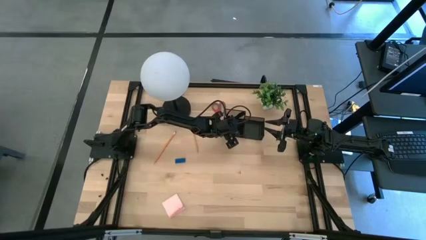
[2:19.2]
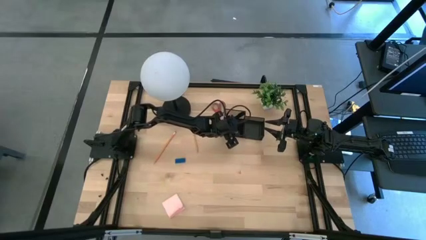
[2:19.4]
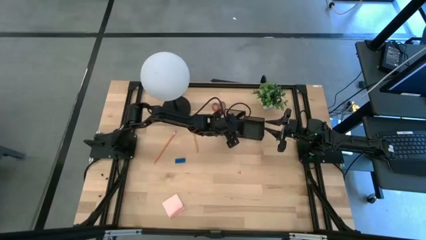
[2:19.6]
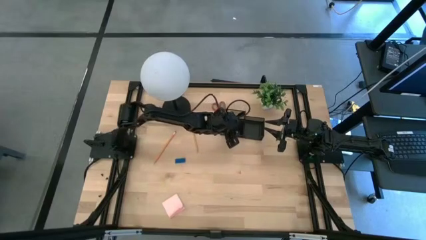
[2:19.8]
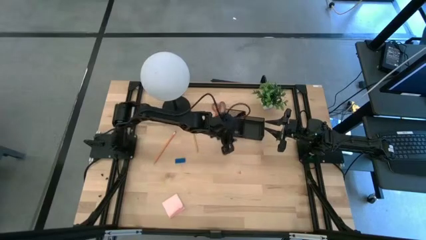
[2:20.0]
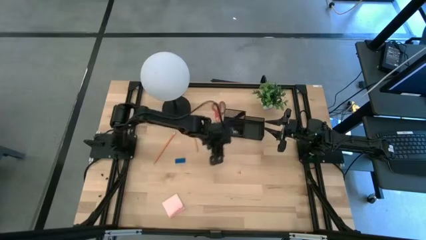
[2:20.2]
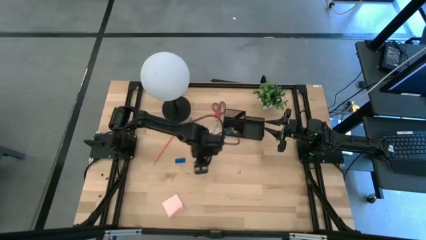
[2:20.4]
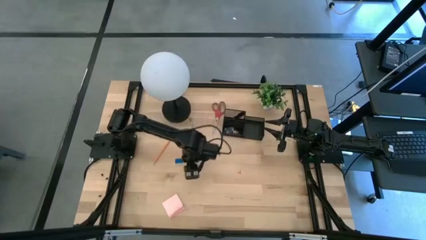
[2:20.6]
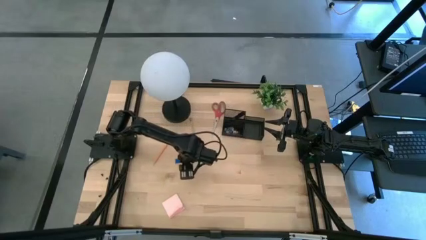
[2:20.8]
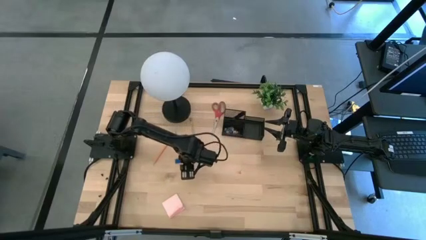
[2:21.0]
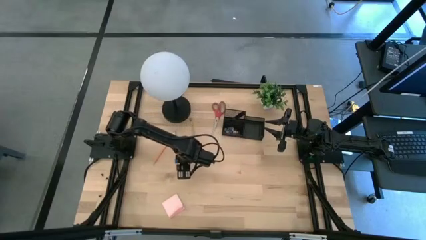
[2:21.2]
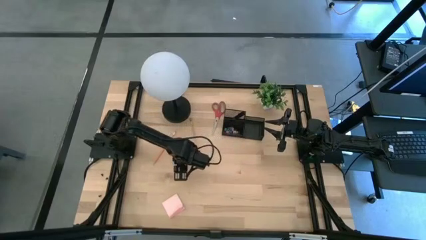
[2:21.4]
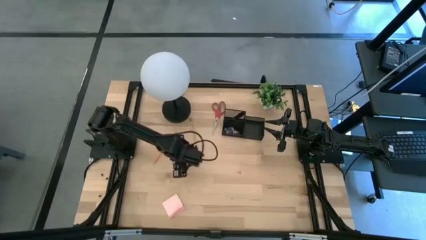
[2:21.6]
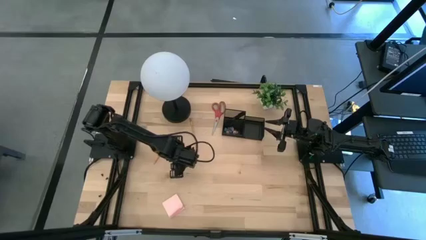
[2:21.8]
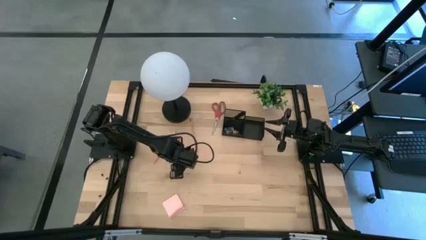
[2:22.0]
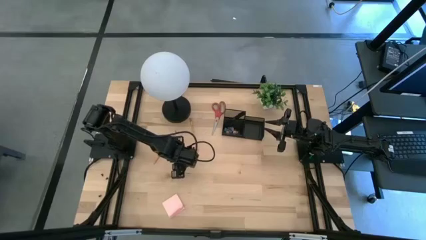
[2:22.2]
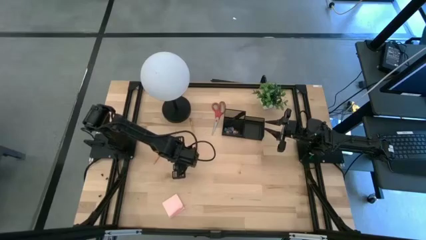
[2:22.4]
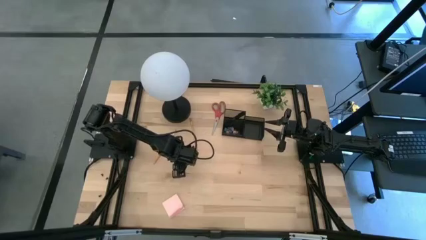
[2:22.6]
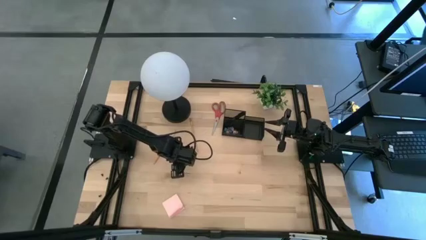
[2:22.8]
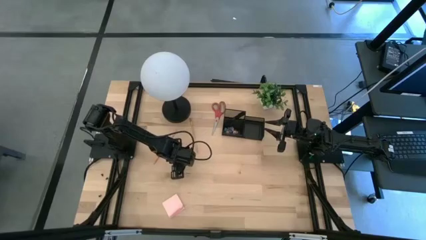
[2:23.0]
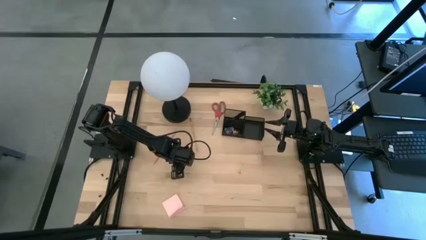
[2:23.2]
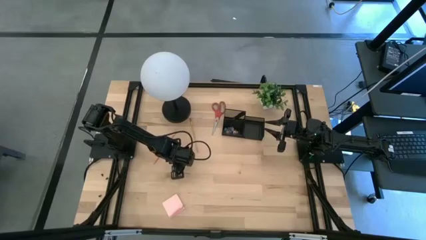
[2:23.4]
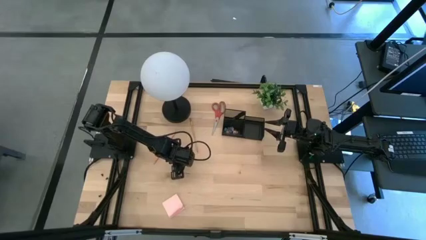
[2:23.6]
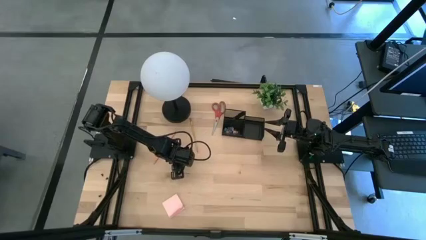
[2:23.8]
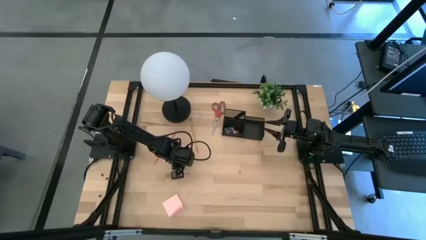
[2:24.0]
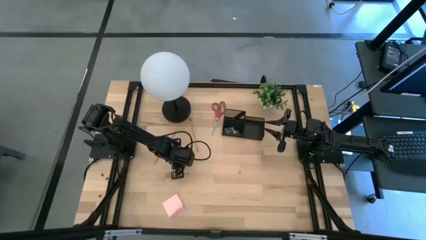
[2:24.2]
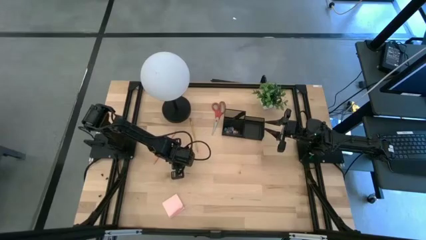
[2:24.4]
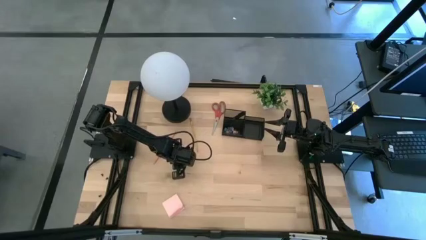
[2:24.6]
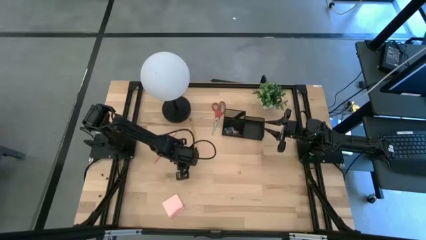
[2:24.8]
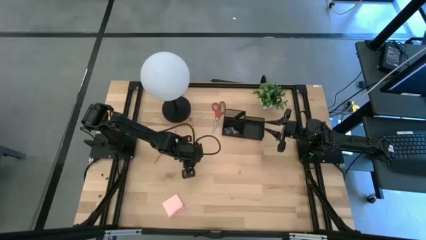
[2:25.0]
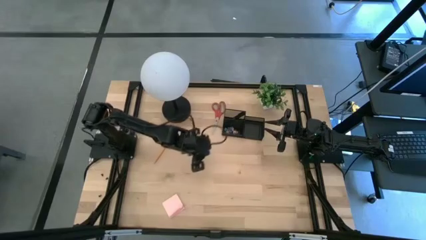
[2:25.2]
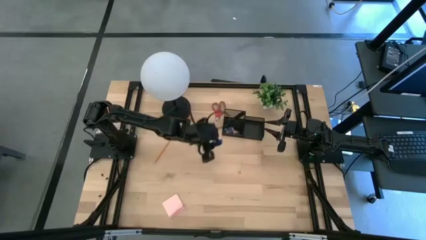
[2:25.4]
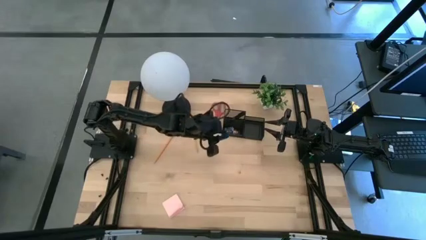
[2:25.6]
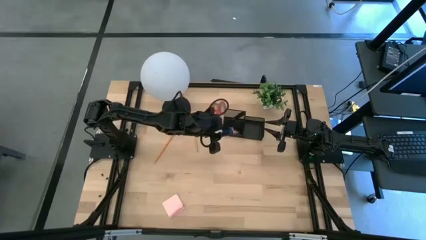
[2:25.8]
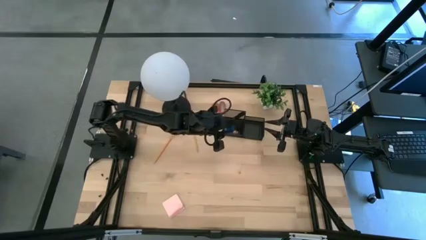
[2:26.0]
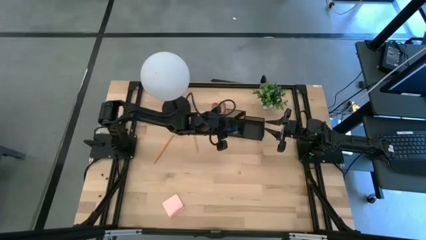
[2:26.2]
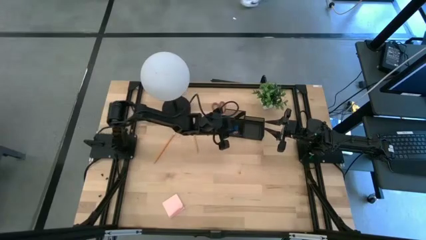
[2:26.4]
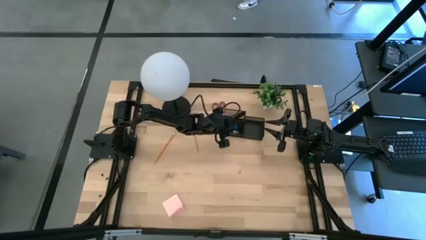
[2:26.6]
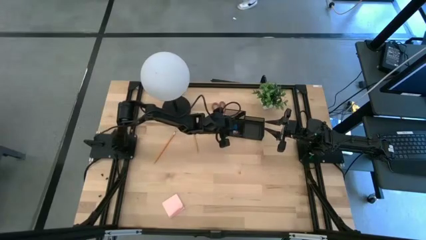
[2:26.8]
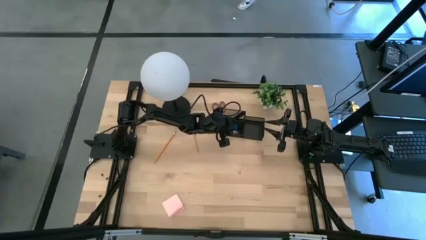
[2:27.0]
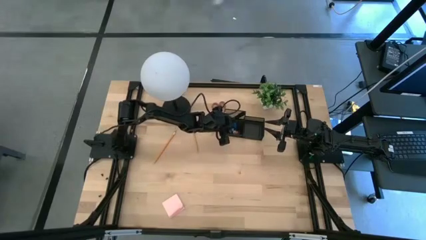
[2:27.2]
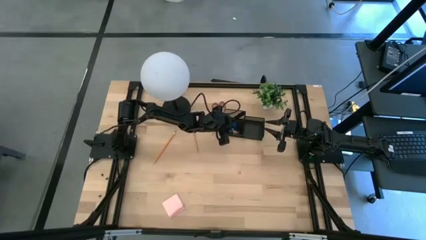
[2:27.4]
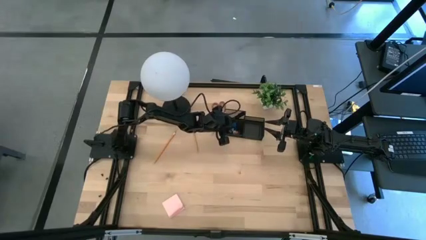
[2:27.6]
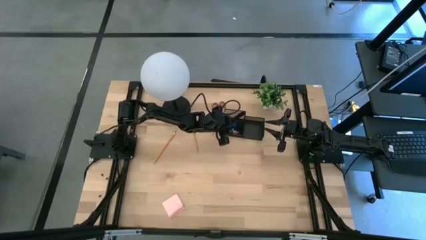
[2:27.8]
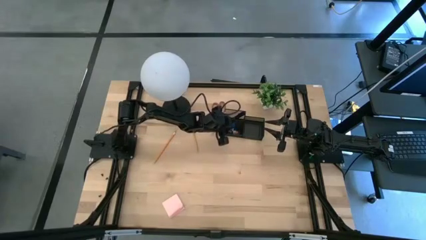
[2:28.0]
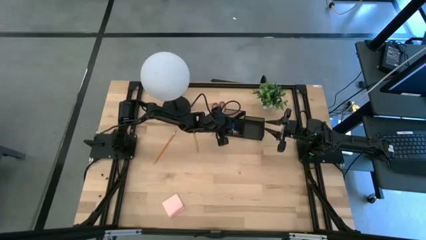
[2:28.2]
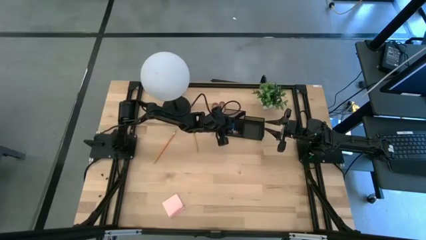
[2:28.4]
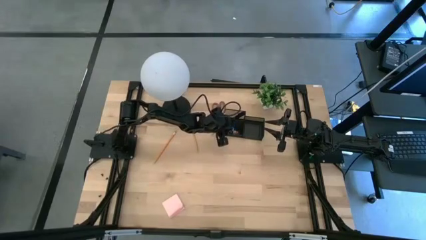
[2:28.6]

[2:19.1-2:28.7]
Task: Pick and place office supplies into organizer
Put the blue eraser into the black desk organizer

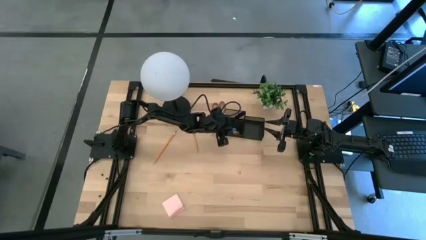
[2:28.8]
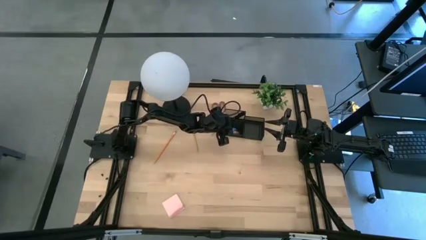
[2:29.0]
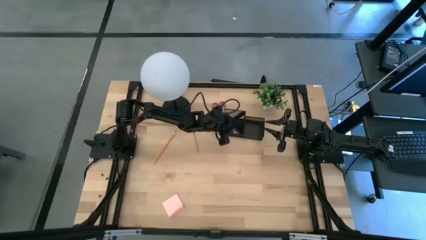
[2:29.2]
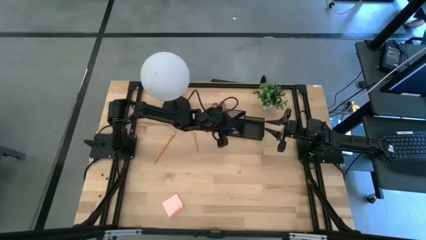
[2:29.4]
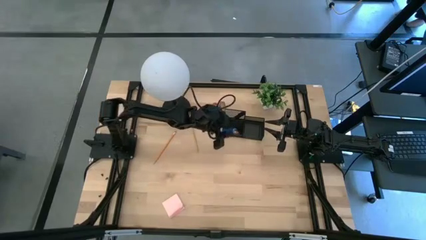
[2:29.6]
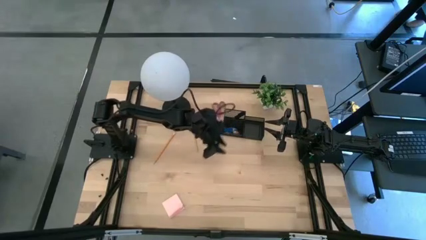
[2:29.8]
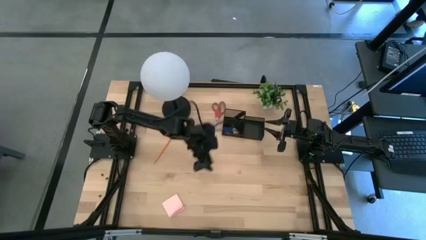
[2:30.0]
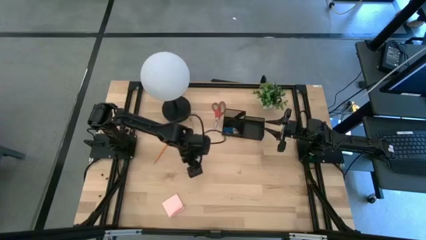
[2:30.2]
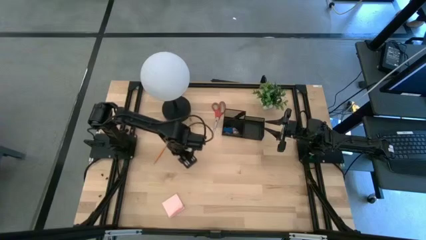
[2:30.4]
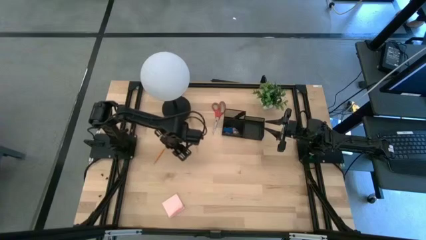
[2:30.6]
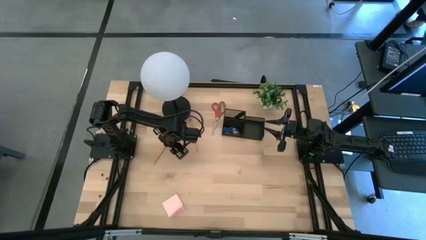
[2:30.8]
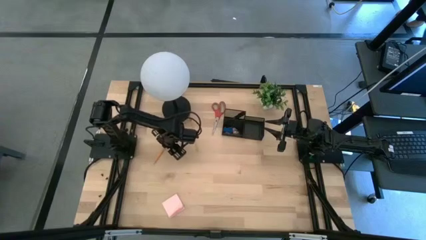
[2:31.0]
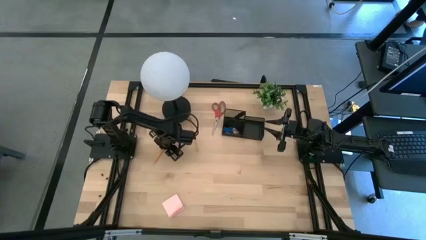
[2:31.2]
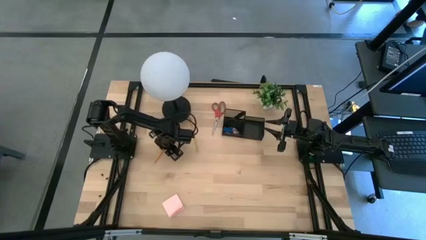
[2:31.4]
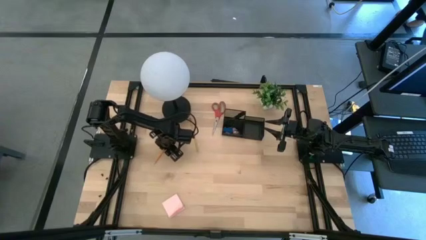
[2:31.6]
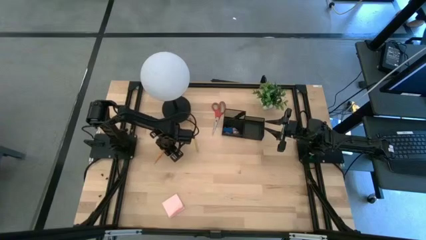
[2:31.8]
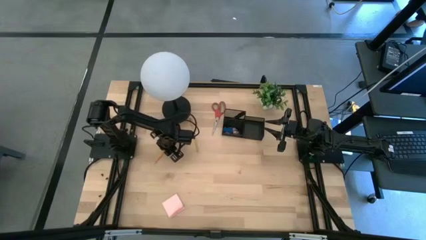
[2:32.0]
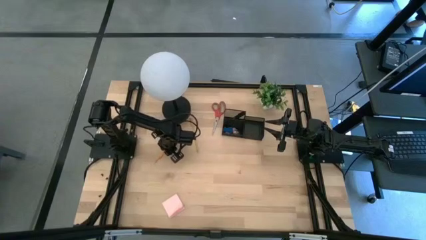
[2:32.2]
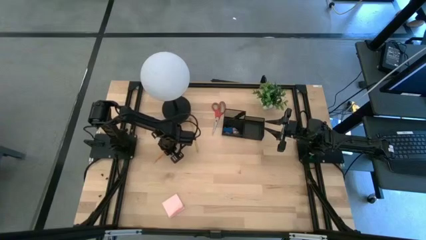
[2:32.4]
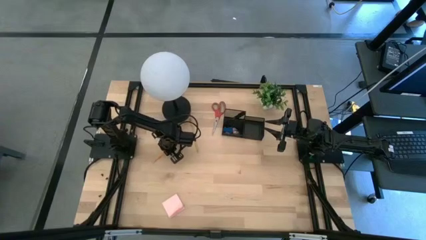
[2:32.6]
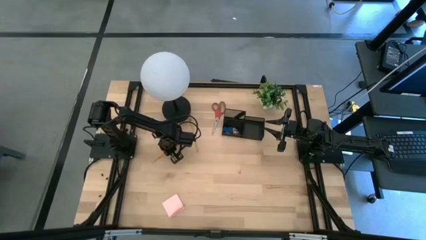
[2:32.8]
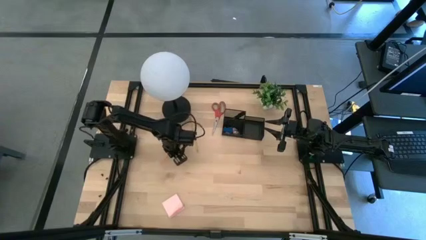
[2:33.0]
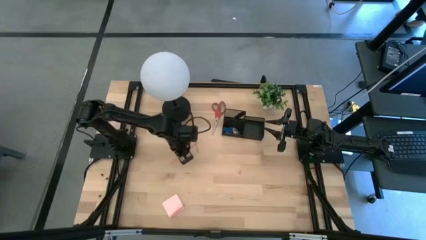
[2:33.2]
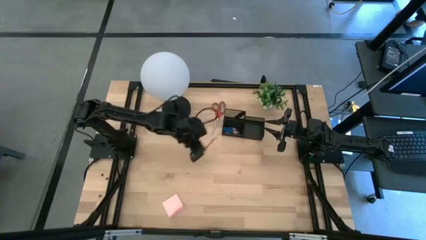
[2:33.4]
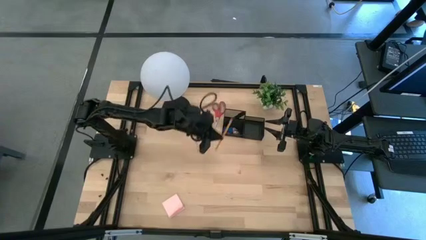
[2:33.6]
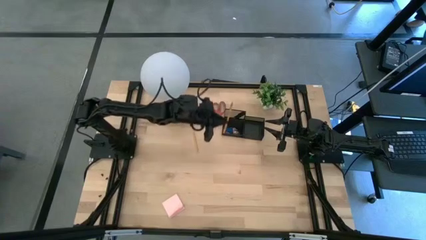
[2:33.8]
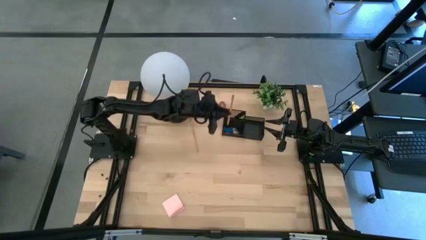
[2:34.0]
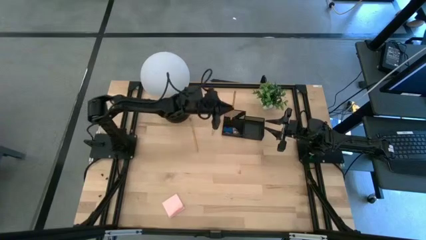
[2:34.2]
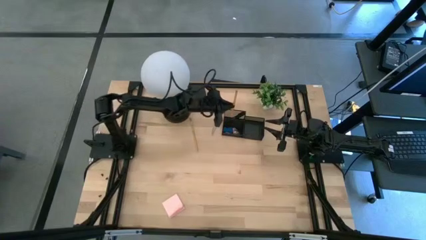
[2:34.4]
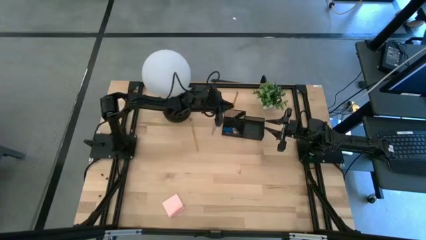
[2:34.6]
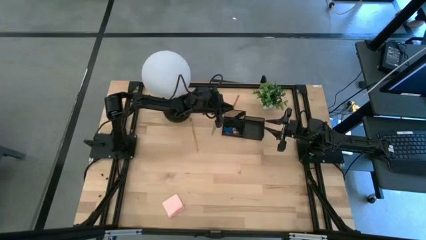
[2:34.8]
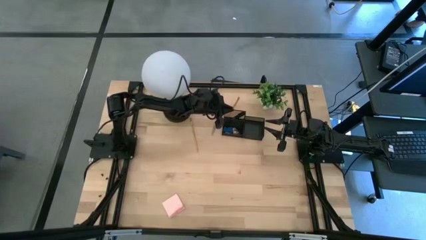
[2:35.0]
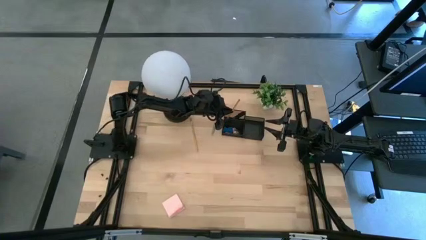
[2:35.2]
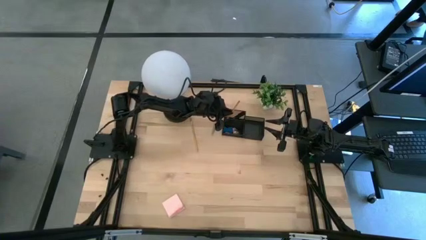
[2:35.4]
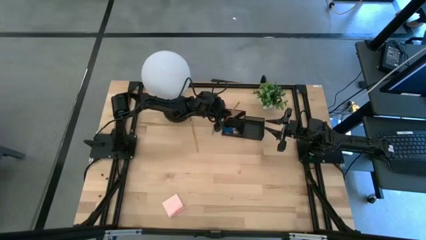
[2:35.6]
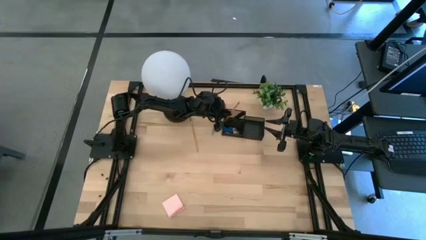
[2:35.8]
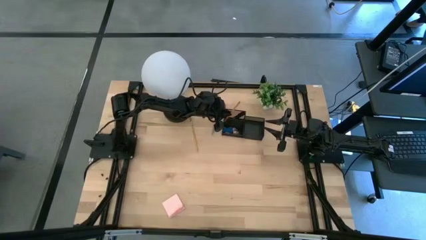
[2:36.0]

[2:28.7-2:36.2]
Put the orange pencil into the black desk organizer
